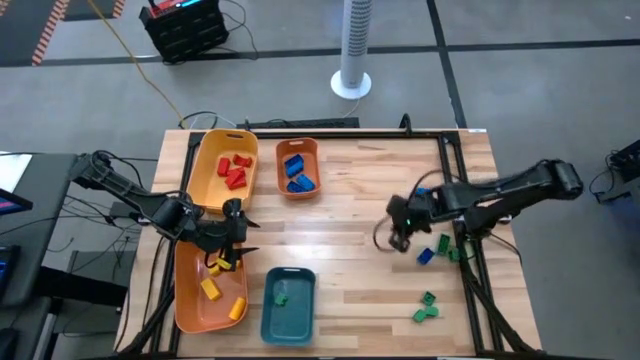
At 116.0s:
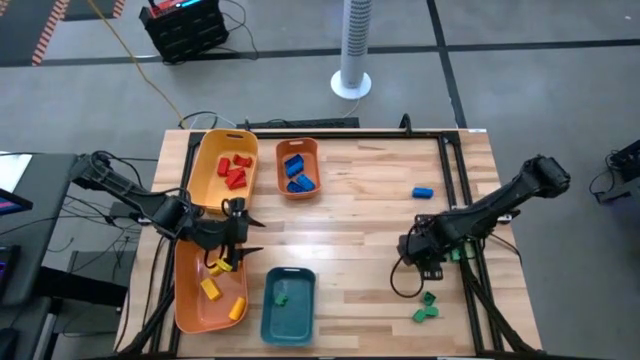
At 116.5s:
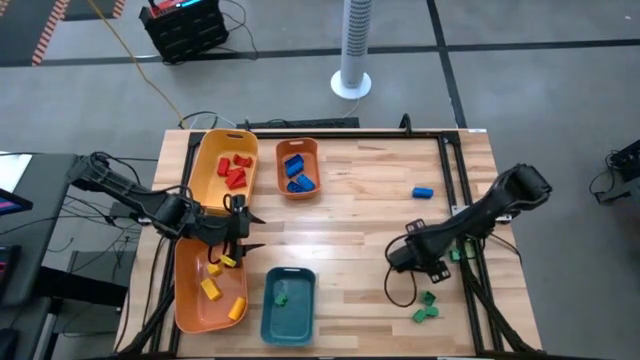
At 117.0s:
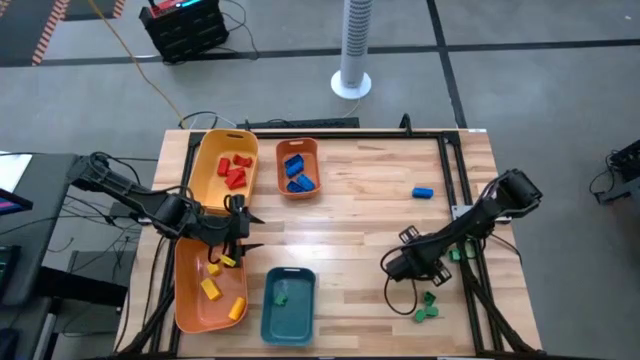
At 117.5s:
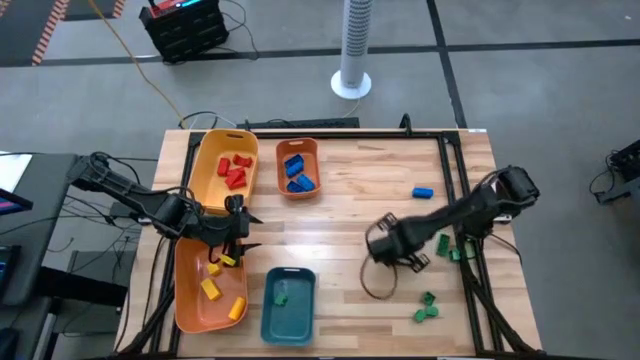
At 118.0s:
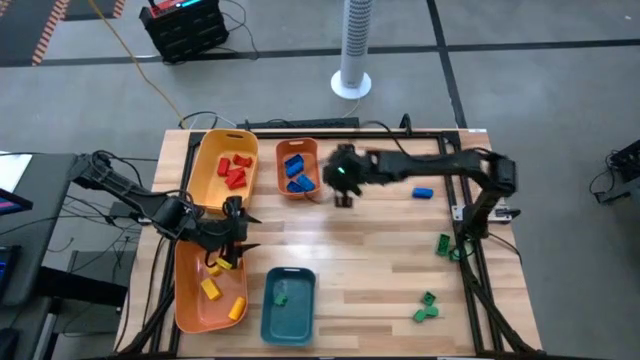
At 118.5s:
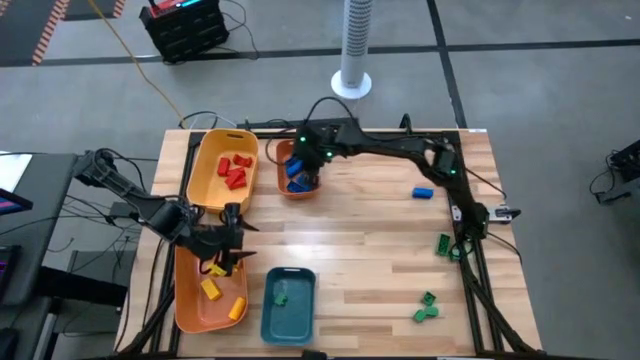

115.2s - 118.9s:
Task: Sort blocks
Put the blue game piece into the top orange bin

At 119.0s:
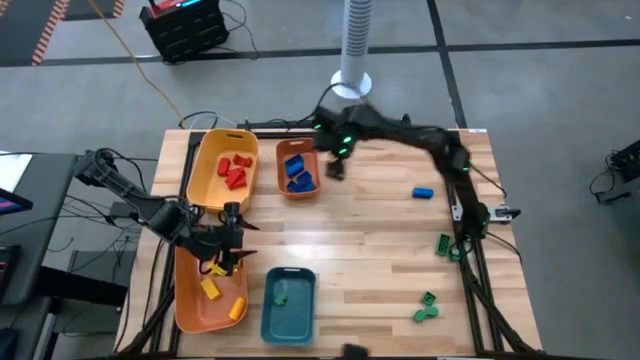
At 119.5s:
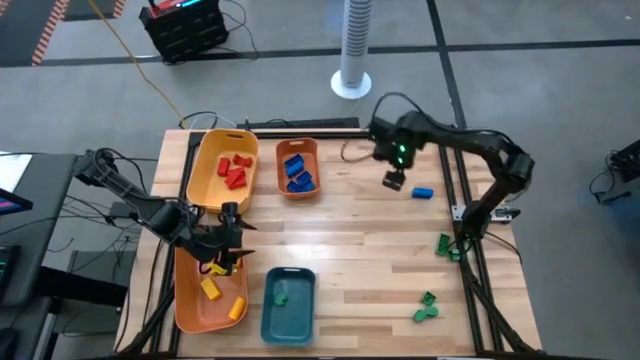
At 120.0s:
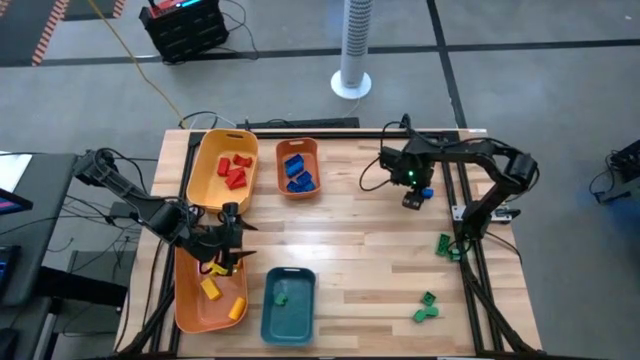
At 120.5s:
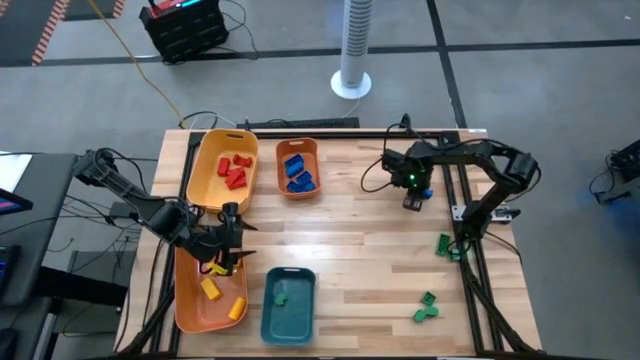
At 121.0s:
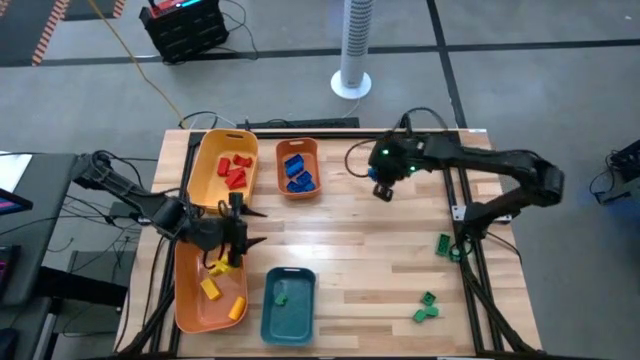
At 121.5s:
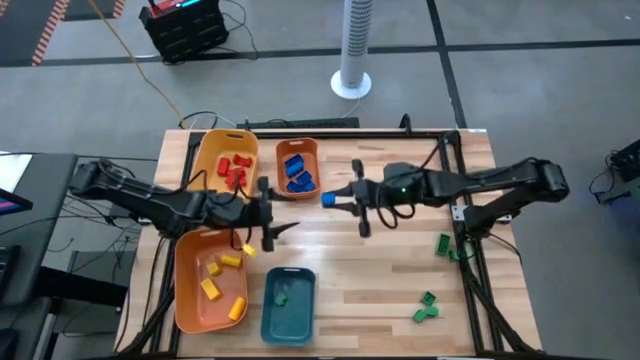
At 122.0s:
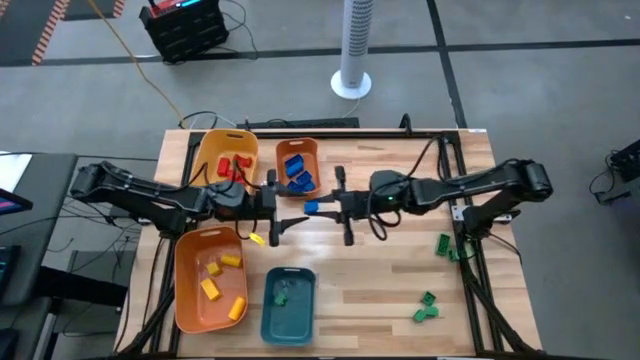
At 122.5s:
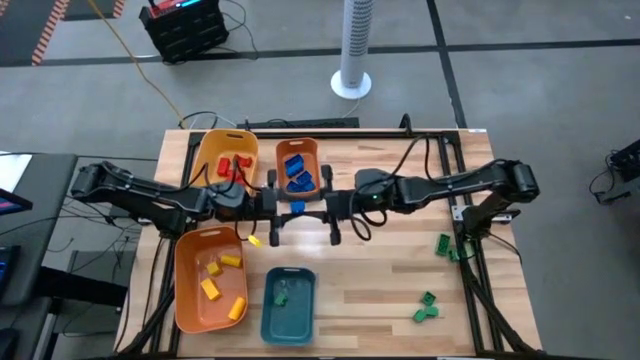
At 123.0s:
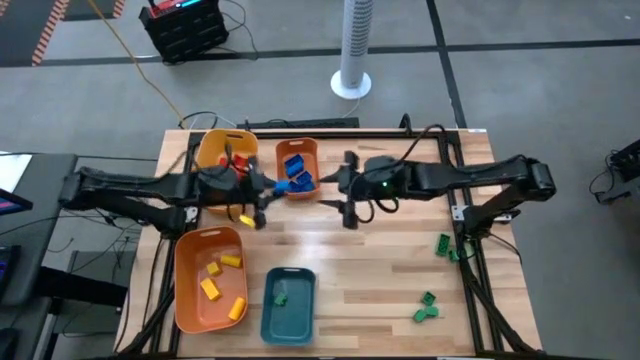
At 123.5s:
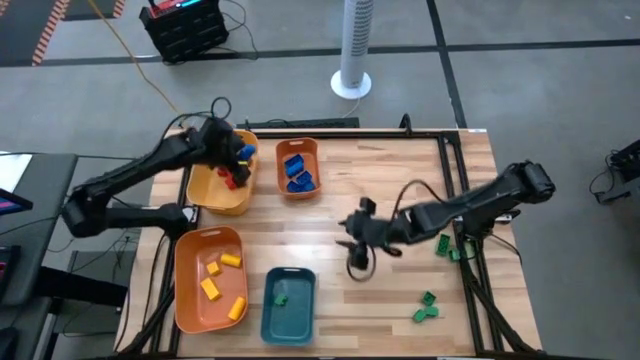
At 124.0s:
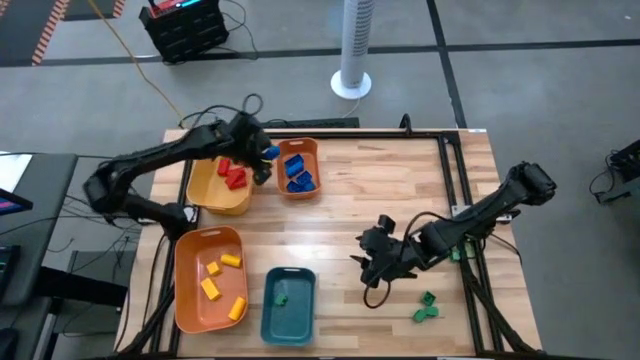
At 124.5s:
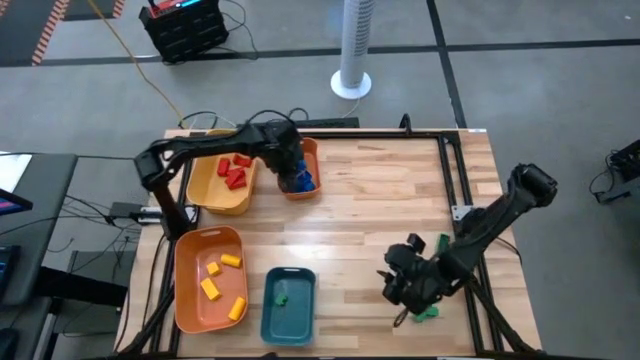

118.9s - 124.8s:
Put the blue game piece into the top orange bin

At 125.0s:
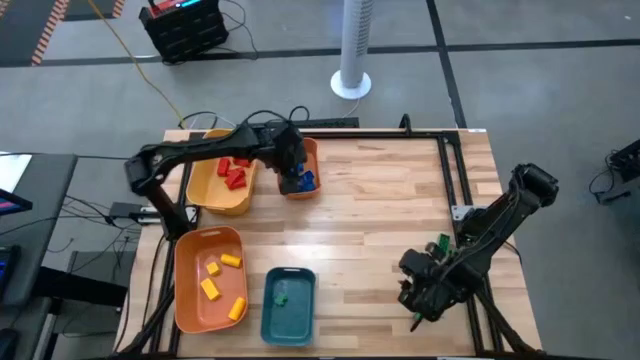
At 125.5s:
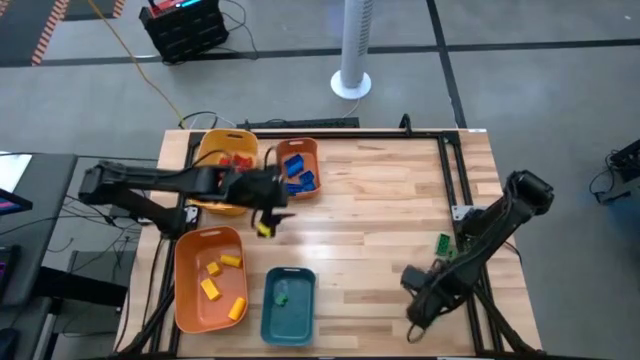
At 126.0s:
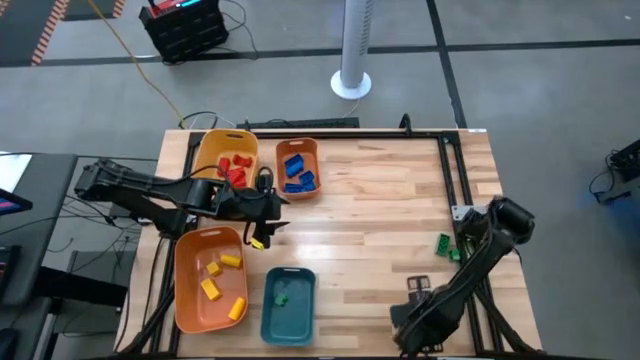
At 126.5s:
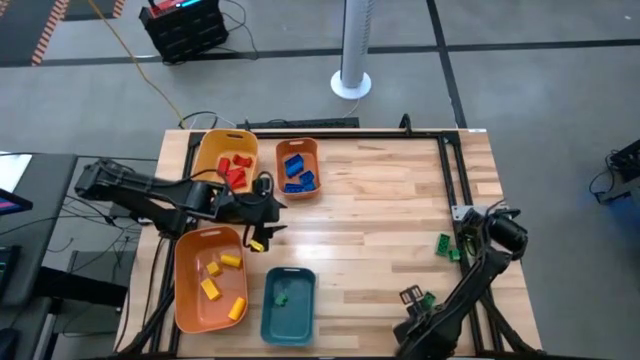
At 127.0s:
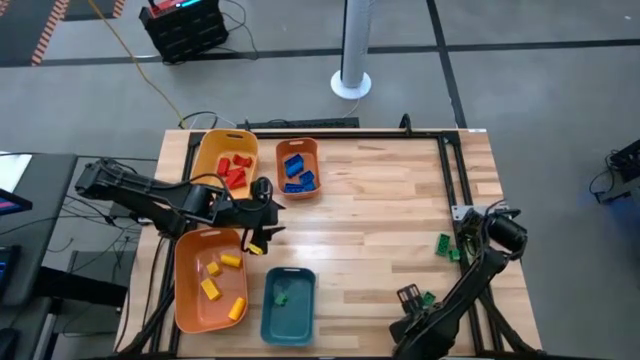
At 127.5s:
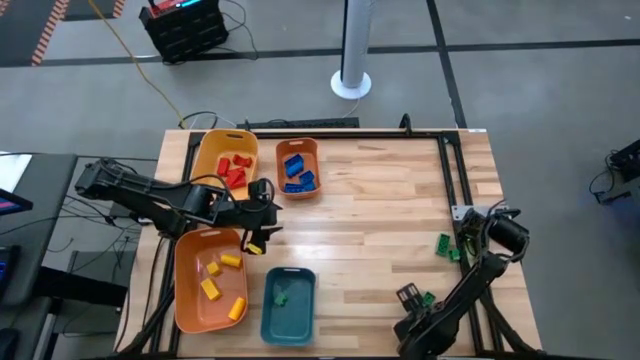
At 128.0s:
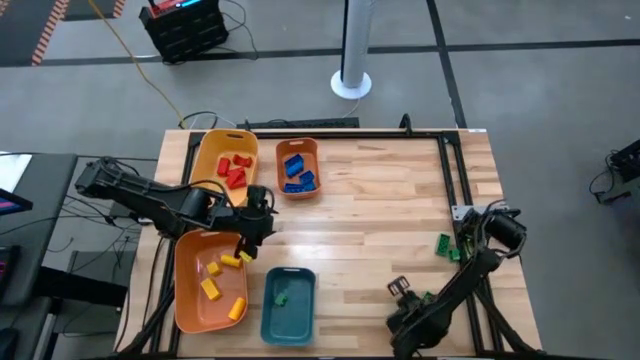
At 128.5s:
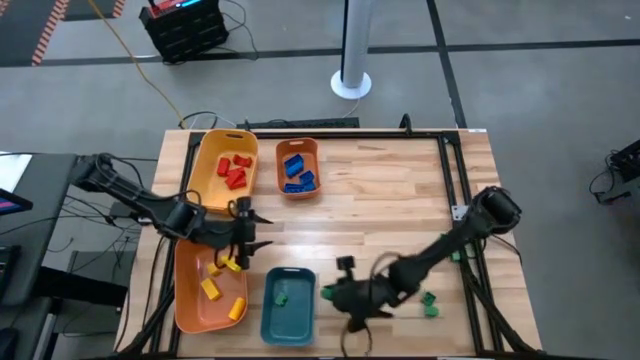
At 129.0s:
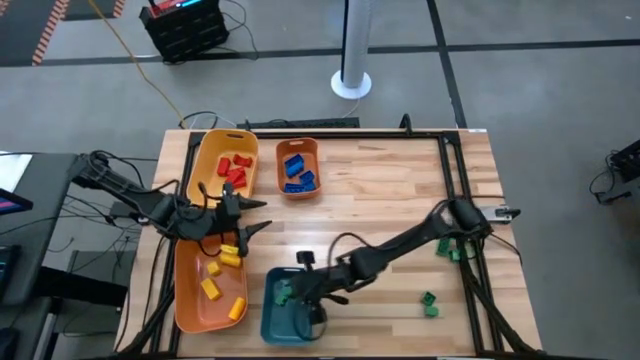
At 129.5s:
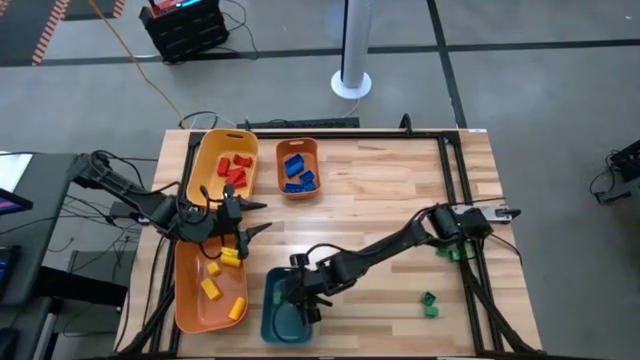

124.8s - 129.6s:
Put the green game piece into the blue bin

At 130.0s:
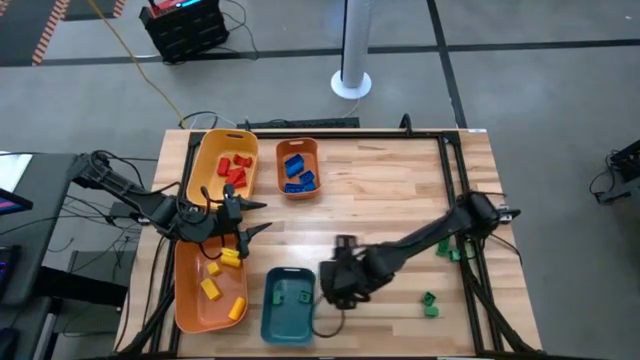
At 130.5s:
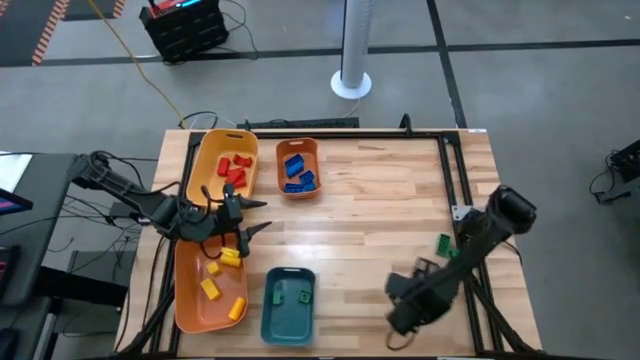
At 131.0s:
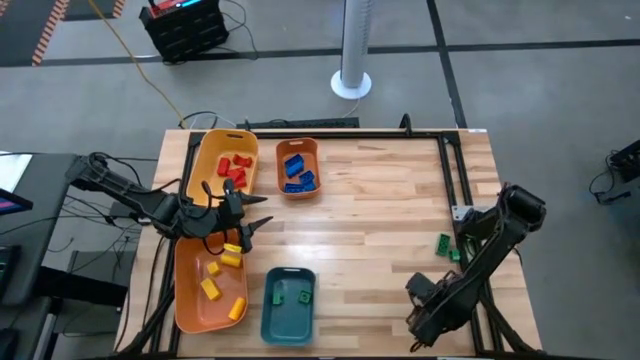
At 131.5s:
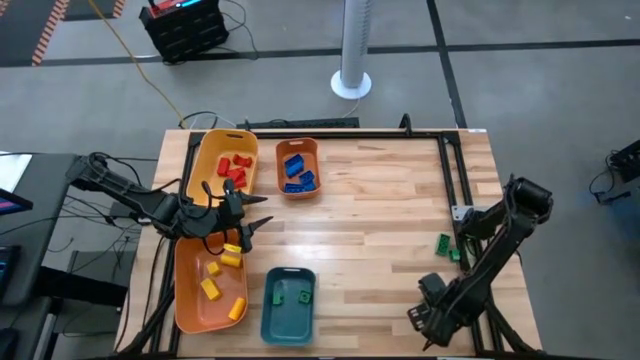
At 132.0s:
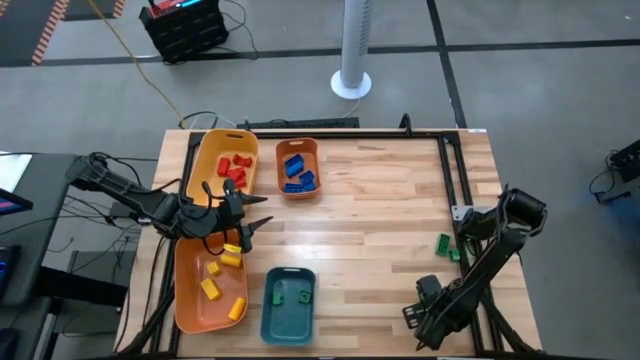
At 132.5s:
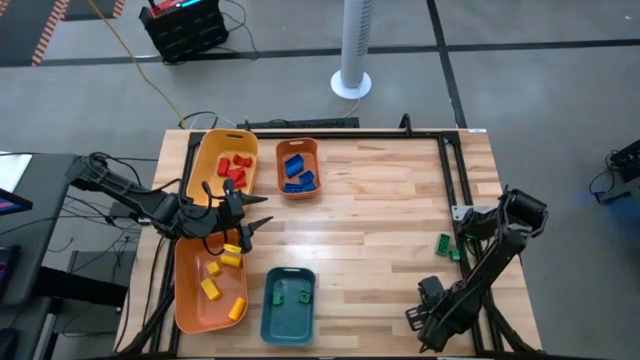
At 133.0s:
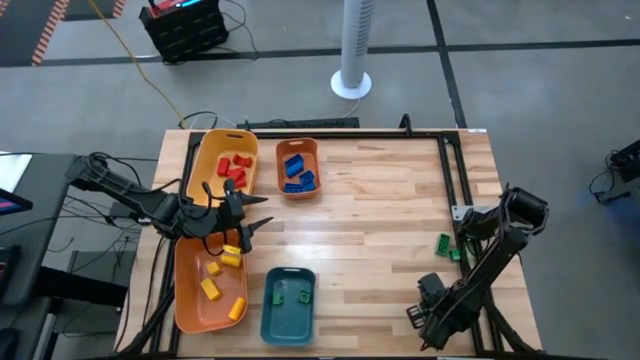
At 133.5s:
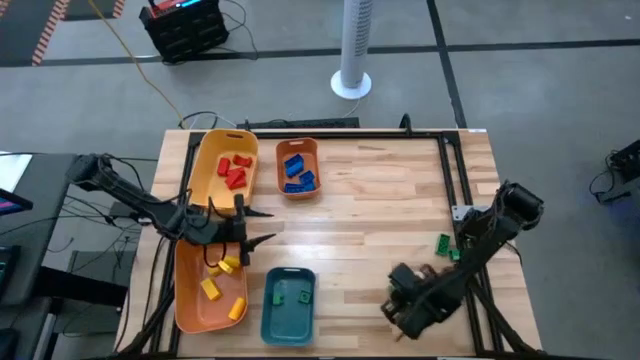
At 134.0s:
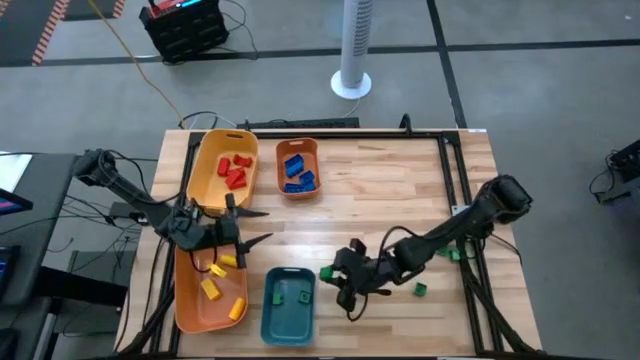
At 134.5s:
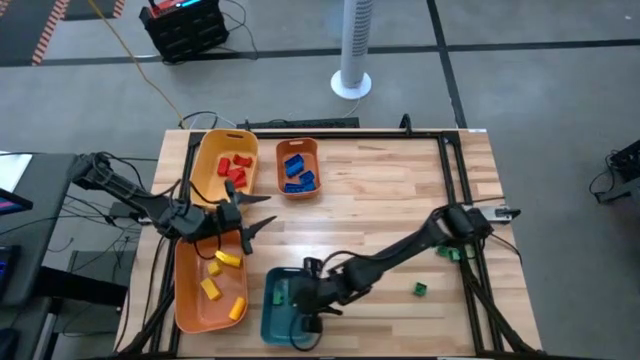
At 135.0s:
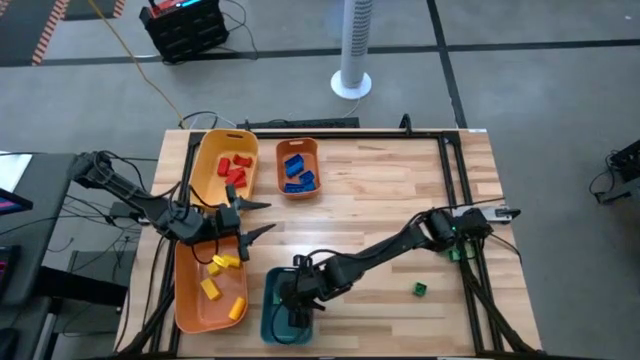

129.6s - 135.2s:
Put the green game piece into the blue bin

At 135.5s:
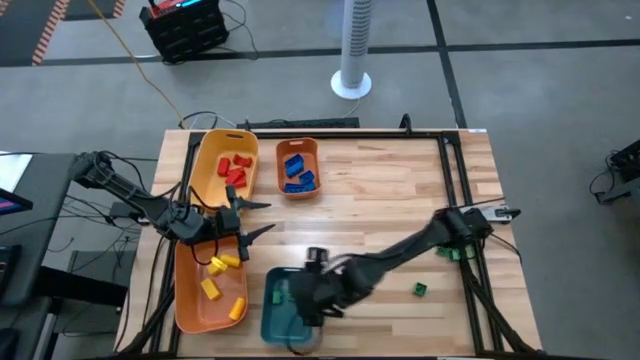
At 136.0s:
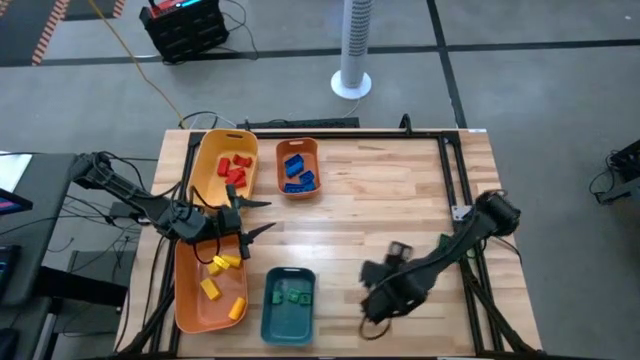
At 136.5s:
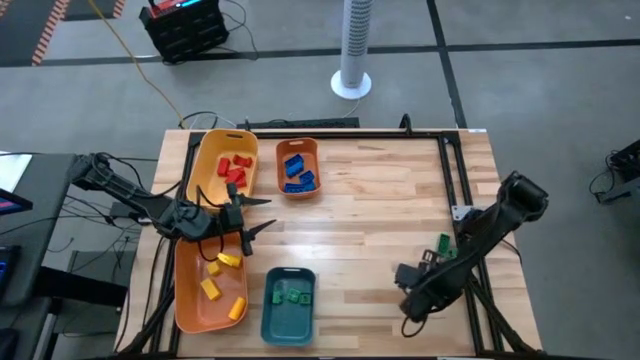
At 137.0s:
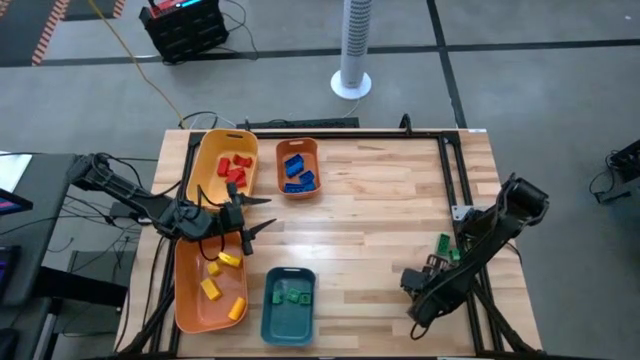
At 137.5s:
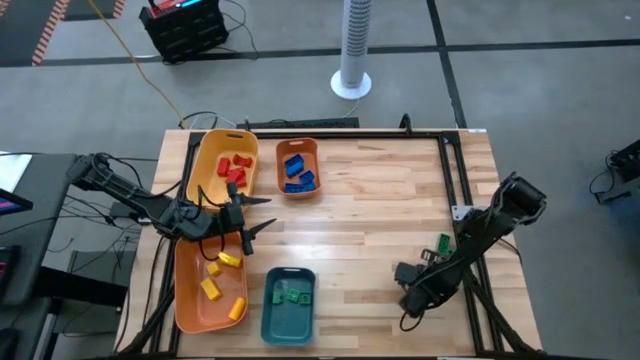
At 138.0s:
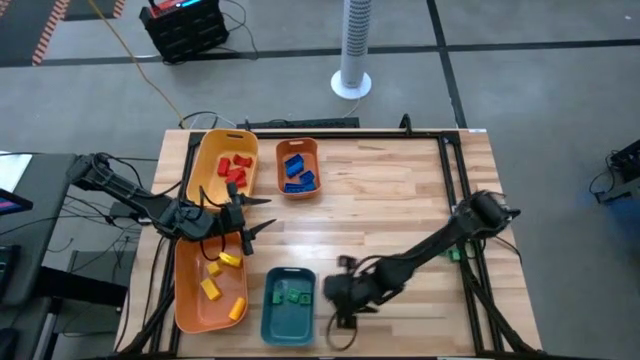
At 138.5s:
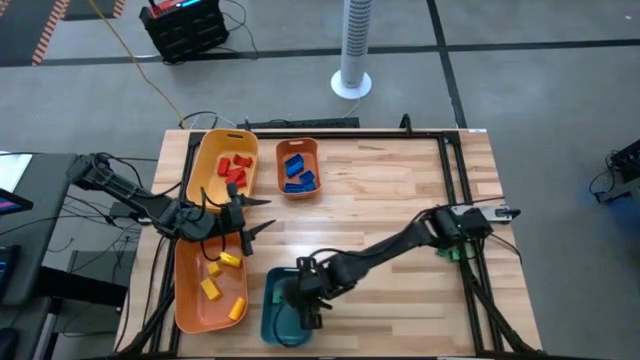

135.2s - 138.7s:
Put the green game piece into the blue bin
